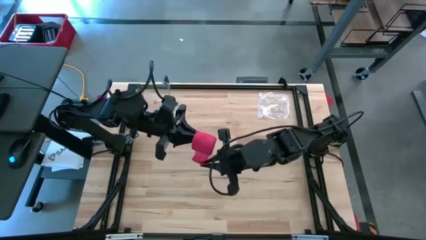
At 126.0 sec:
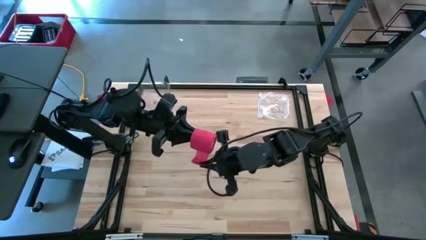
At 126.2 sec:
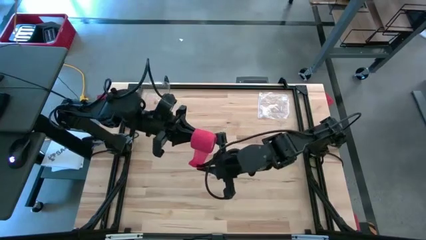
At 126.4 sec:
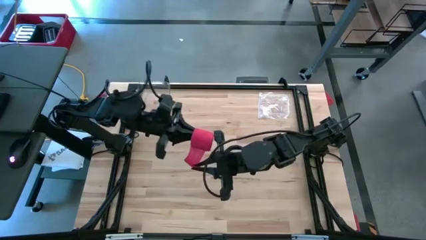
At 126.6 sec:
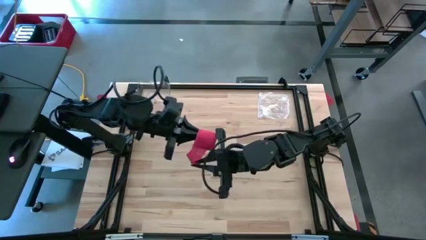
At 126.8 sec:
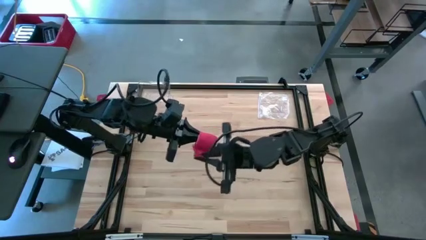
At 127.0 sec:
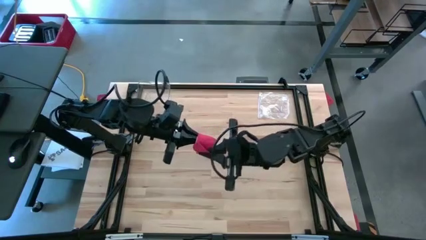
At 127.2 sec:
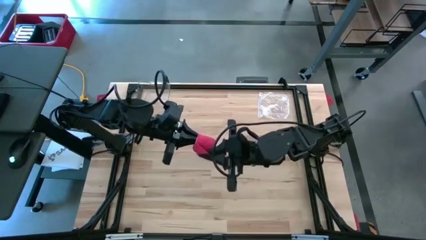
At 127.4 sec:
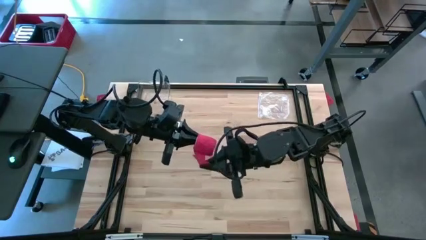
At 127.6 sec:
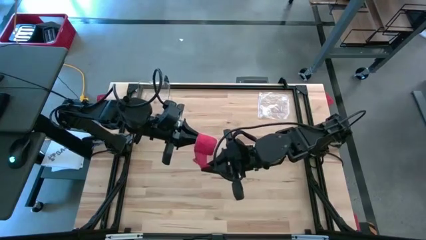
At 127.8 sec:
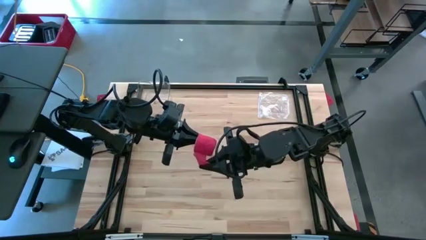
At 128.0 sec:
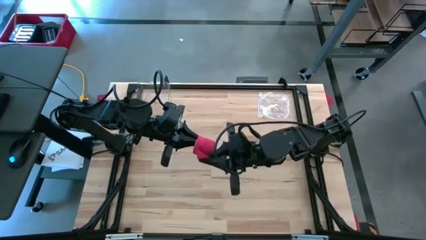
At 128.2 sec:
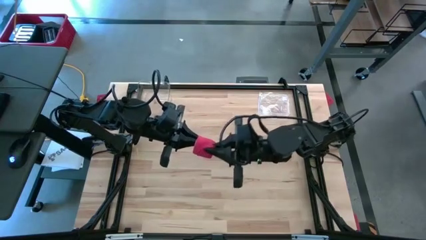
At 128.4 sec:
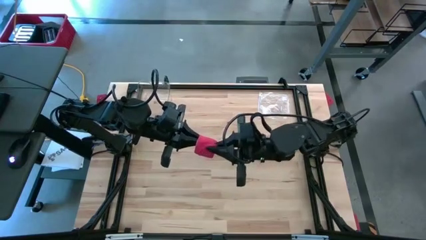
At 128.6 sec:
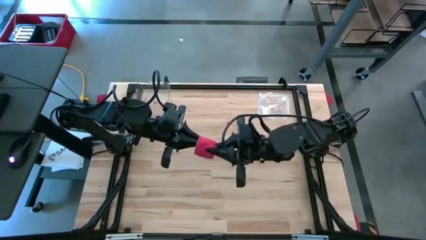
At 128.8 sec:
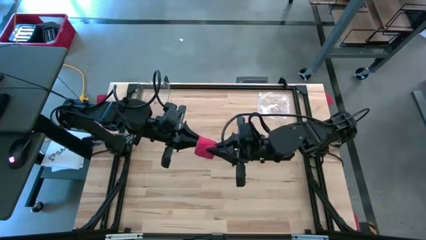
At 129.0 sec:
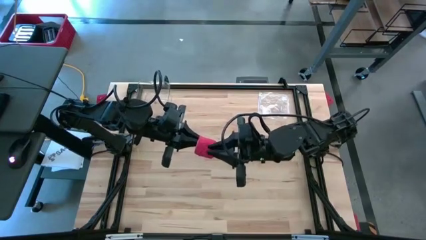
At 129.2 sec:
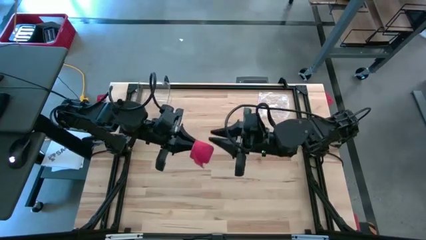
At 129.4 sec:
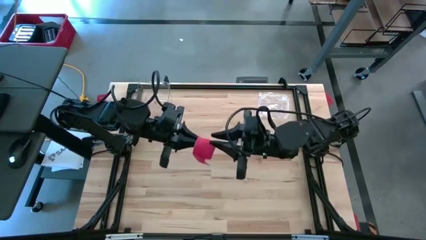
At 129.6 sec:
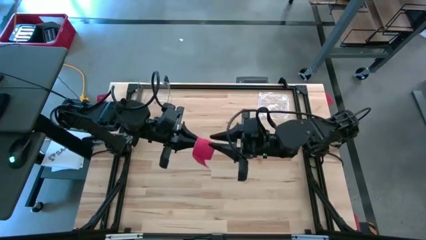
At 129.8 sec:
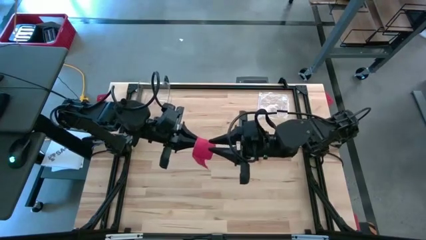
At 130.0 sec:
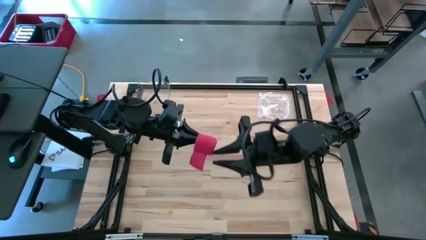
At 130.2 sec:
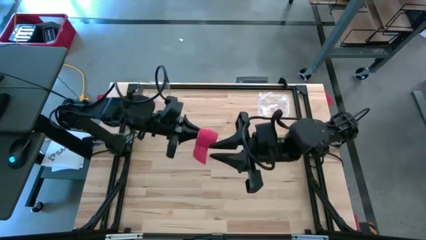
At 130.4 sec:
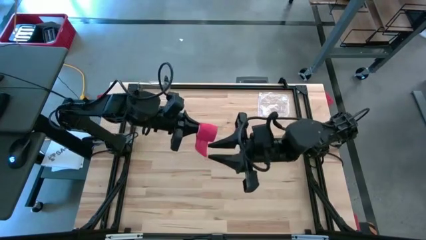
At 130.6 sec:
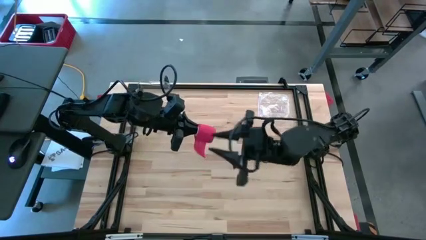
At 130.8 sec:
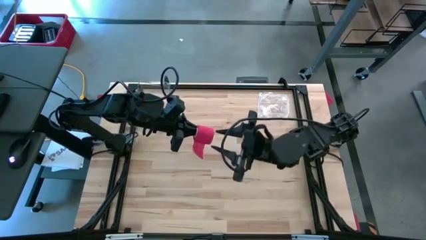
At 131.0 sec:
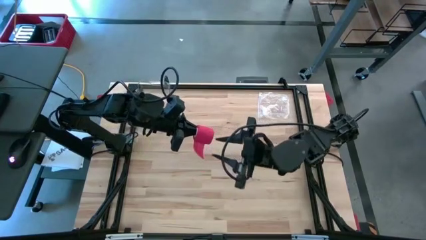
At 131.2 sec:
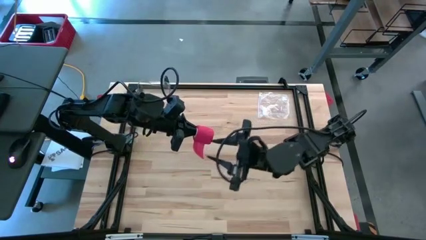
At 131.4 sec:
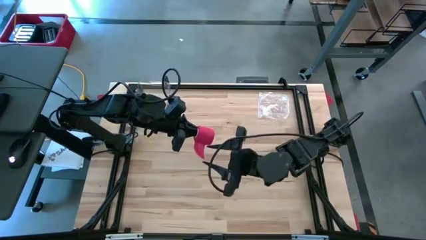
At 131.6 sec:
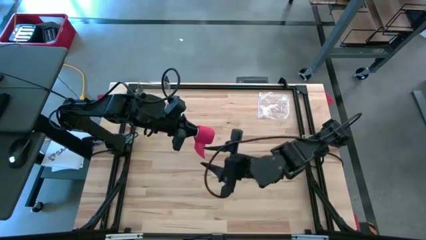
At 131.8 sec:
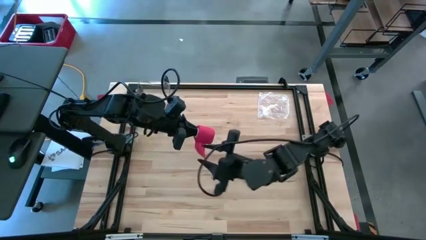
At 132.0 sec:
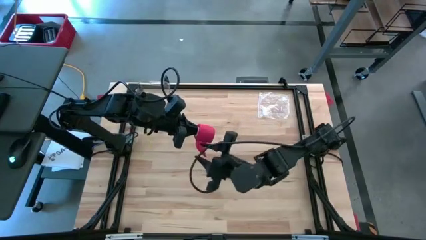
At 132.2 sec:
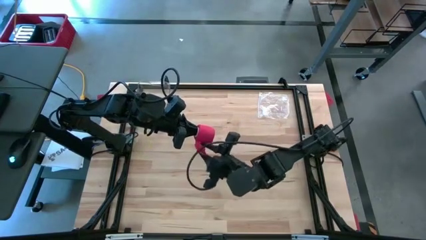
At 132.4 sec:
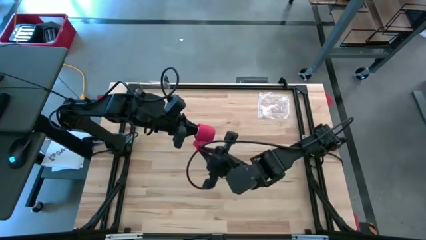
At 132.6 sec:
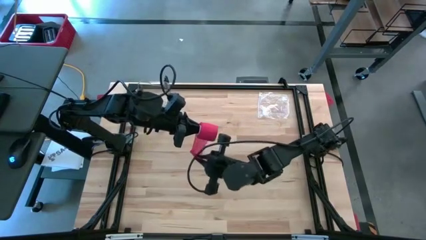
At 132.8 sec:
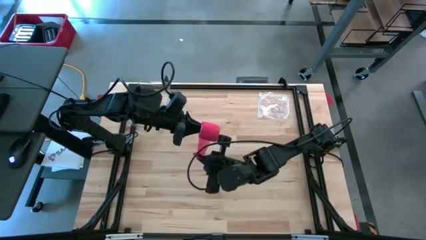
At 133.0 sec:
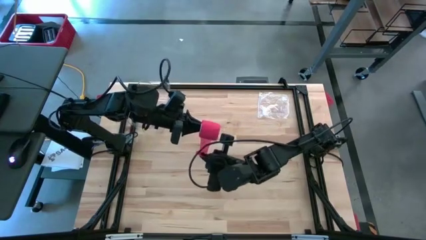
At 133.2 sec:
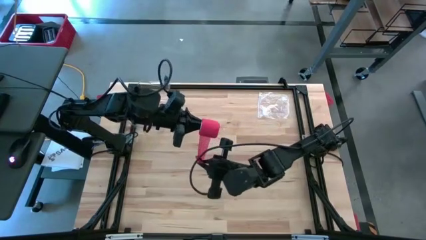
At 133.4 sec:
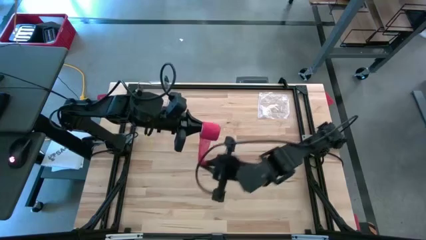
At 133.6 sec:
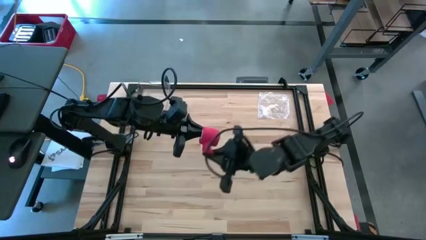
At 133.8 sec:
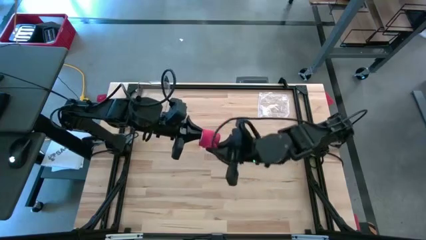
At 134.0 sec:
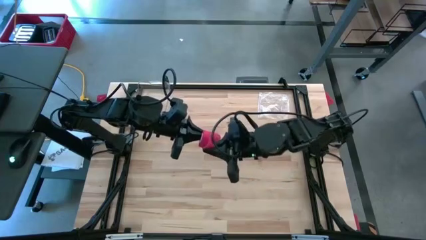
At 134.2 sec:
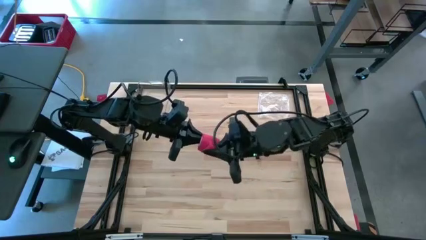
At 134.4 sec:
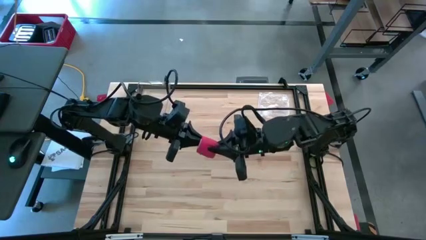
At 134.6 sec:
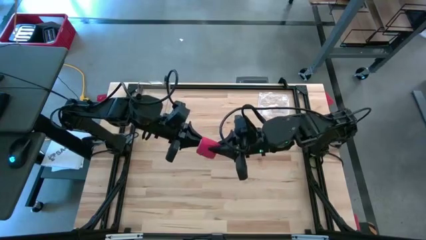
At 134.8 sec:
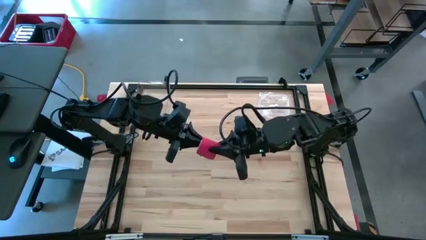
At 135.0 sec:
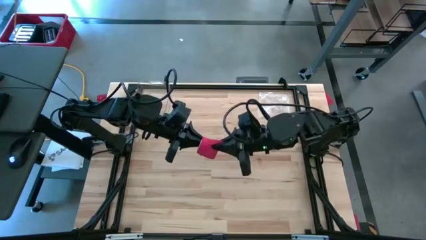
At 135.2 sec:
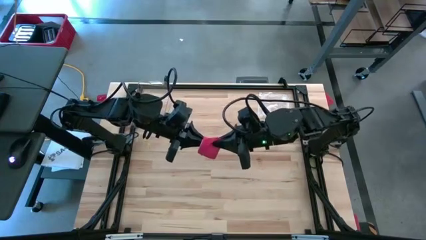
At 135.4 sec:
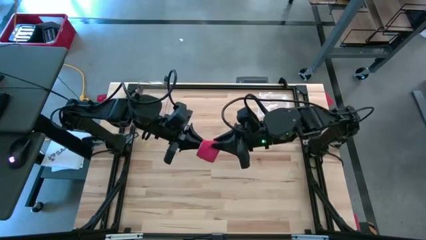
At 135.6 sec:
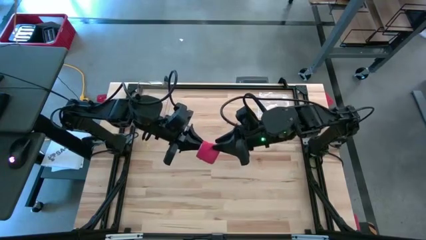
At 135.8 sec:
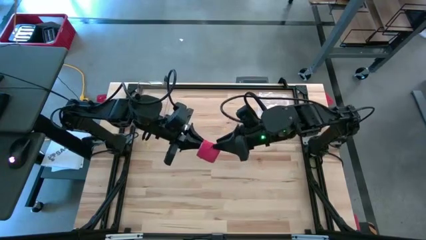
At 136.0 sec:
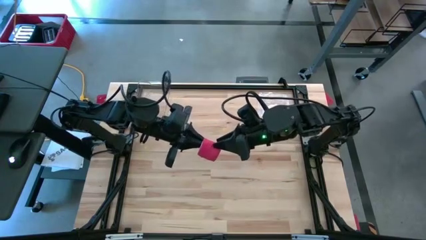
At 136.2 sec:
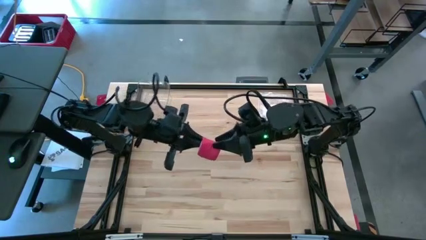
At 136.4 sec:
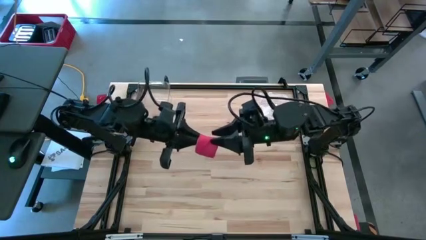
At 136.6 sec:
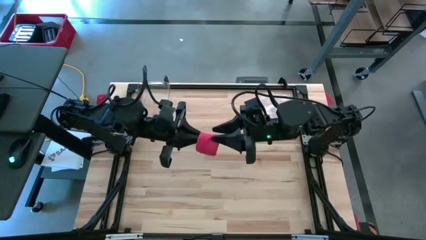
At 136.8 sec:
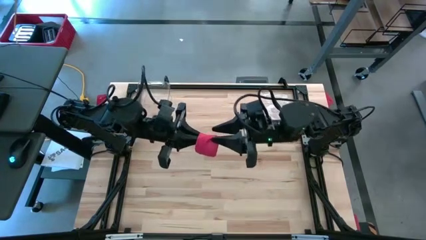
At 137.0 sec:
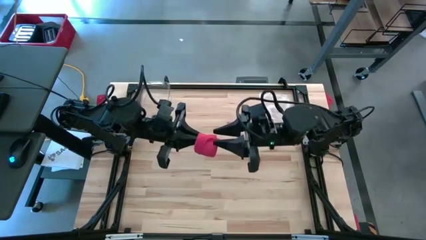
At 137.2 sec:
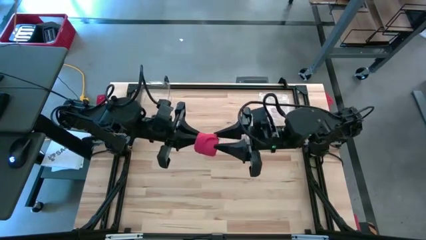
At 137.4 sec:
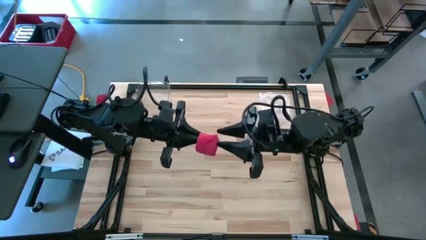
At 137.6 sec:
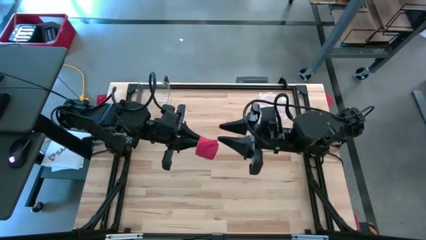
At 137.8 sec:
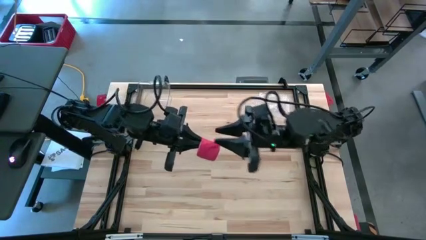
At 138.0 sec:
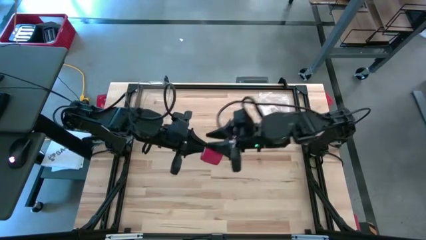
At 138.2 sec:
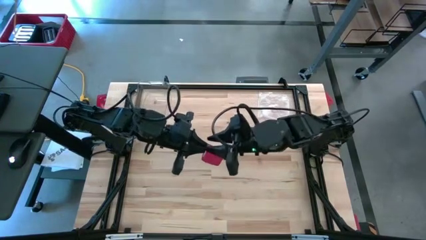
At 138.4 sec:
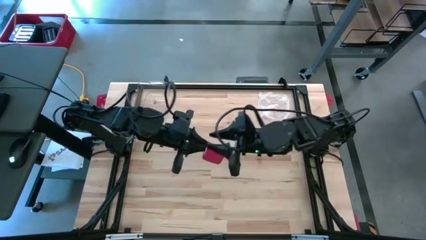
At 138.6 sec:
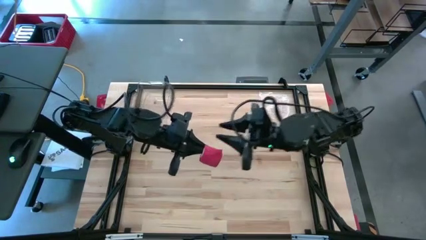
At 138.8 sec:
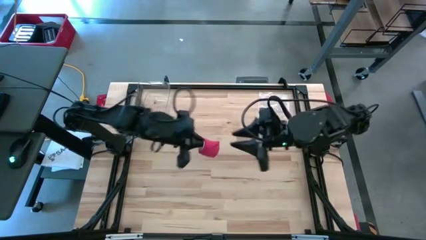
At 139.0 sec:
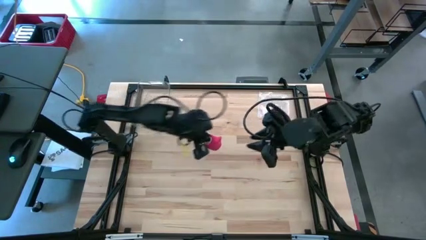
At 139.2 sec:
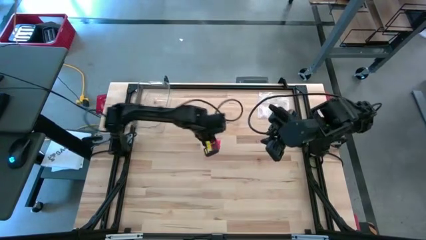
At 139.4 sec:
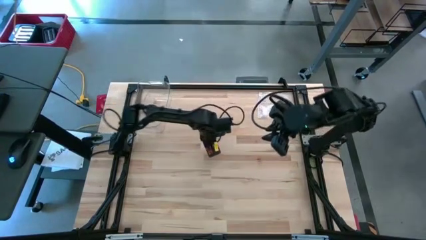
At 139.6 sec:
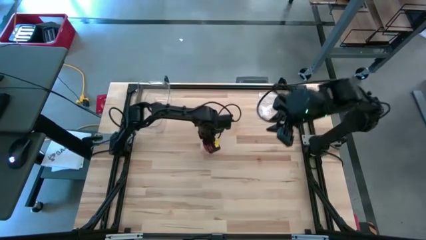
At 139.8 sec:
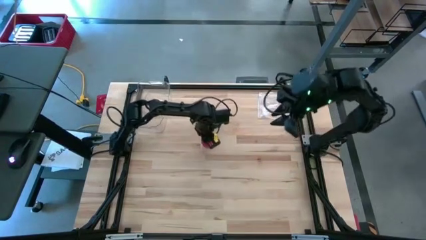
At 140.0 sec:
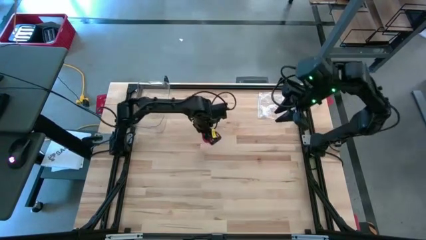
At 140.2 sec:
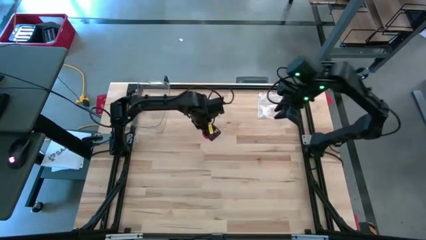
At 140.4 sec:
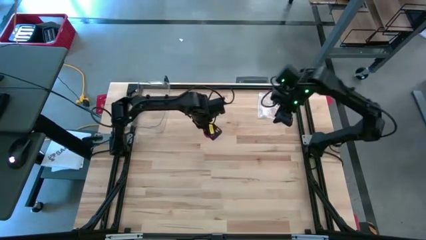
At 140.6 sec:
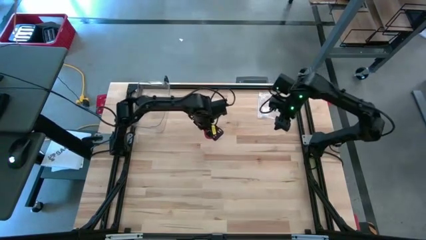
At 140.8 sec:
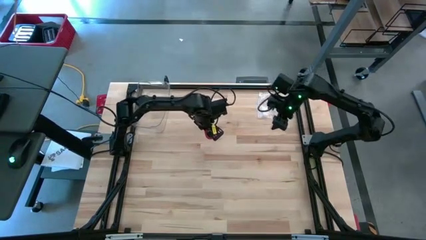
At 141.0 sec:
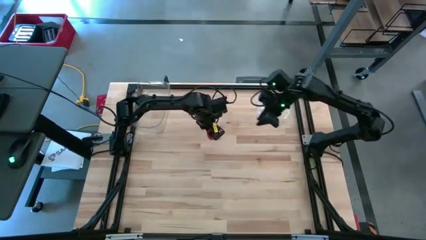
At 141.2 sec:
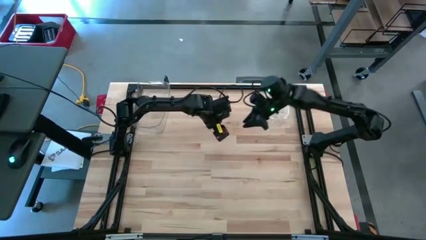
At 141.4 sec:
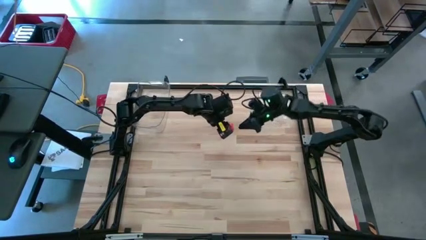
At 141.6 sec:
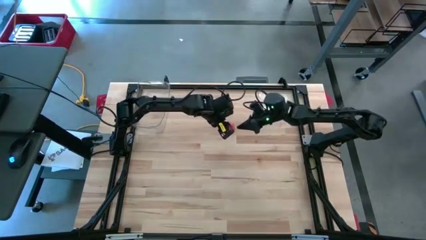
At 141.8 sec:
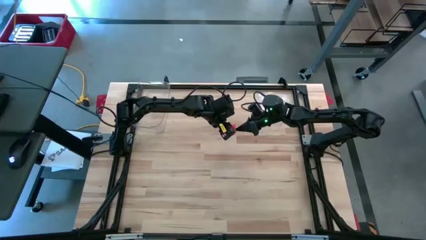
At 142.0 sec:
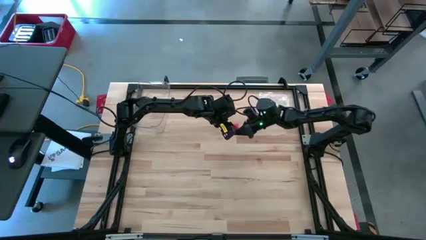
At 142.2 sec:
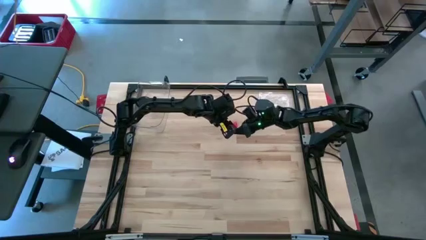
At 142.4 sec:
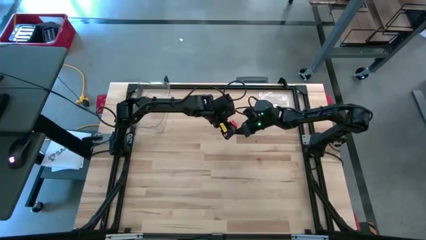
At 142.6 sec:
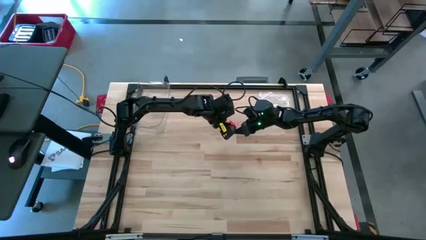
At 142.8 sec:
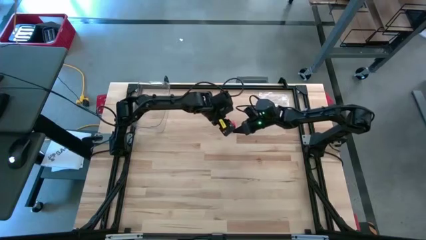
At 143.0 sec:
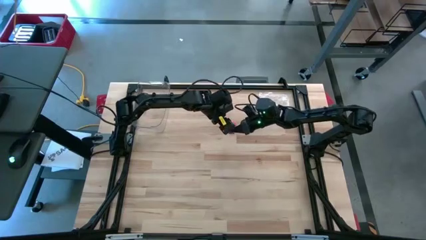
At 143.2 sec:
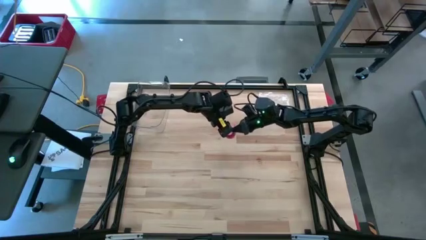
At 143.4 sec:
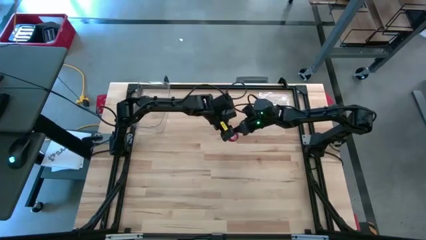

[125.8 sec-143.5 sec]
Task: Roll bandage
Roll the red bandage
